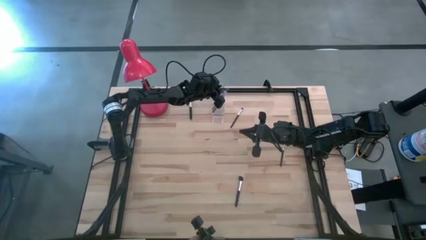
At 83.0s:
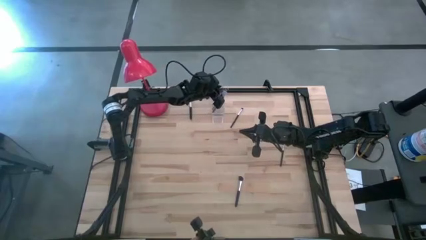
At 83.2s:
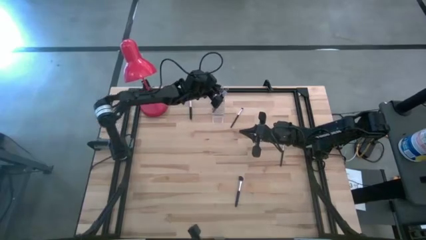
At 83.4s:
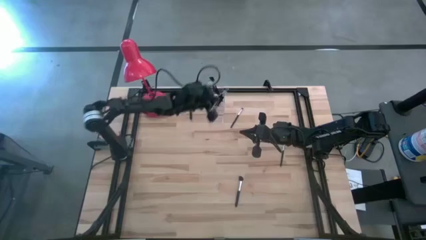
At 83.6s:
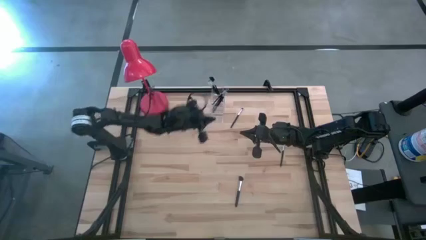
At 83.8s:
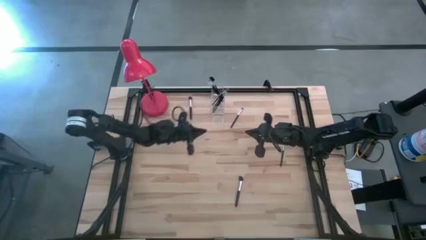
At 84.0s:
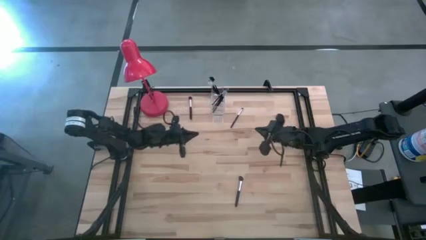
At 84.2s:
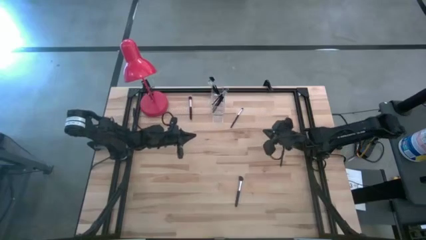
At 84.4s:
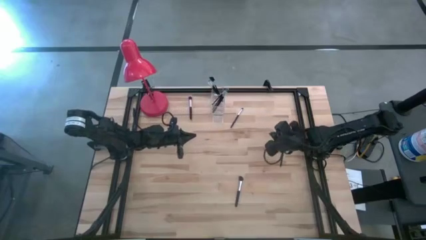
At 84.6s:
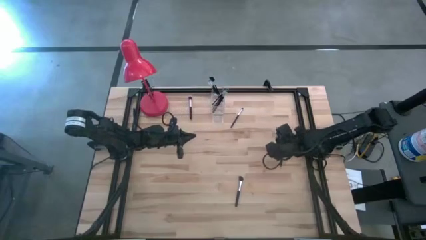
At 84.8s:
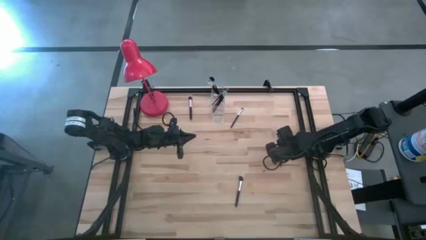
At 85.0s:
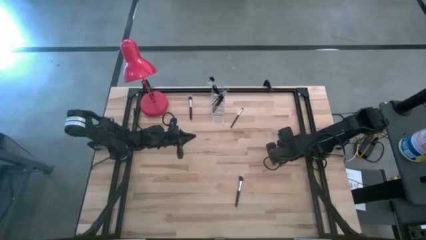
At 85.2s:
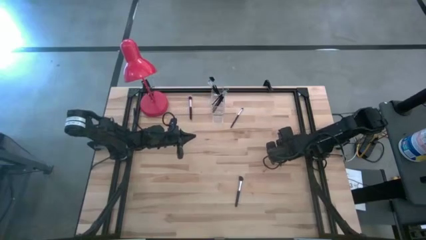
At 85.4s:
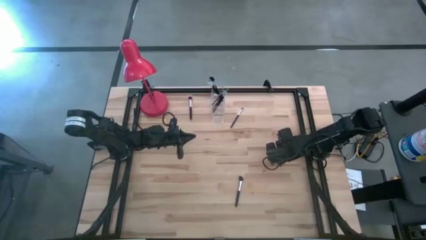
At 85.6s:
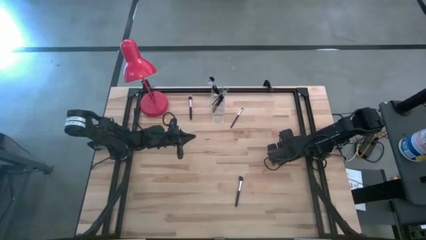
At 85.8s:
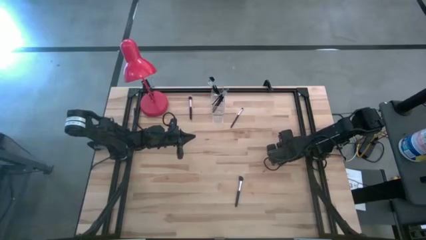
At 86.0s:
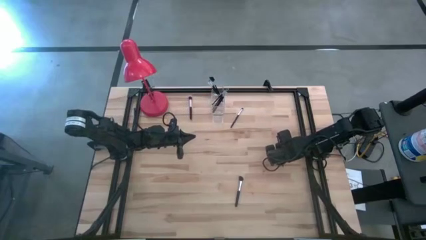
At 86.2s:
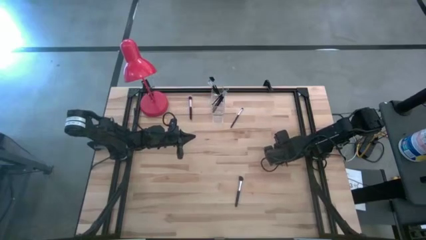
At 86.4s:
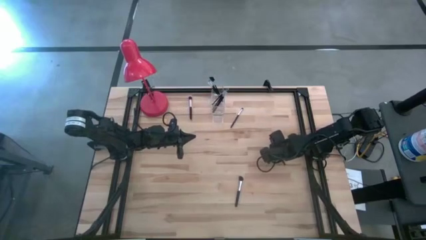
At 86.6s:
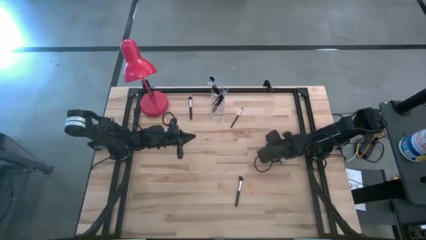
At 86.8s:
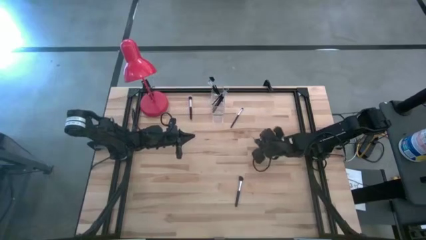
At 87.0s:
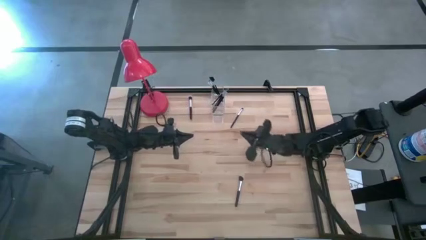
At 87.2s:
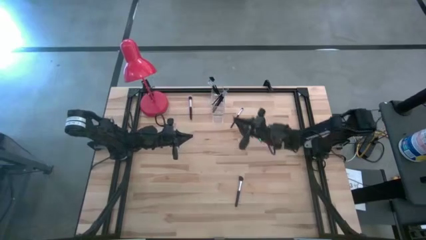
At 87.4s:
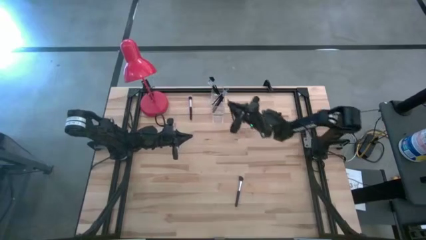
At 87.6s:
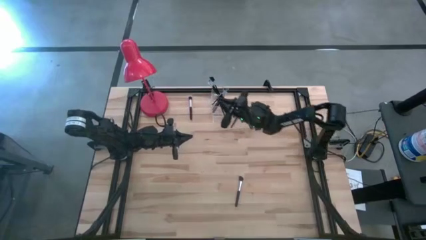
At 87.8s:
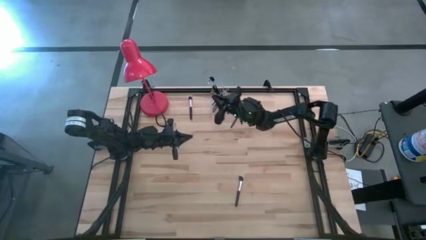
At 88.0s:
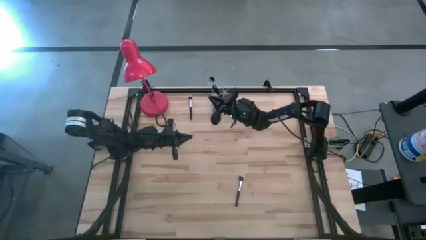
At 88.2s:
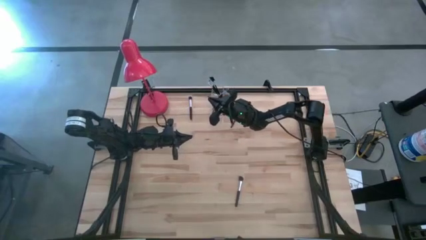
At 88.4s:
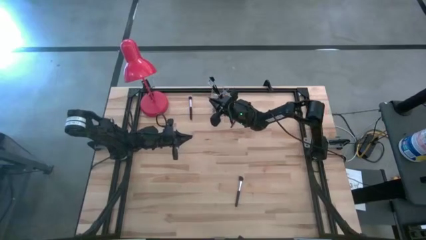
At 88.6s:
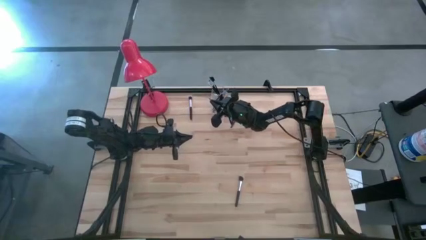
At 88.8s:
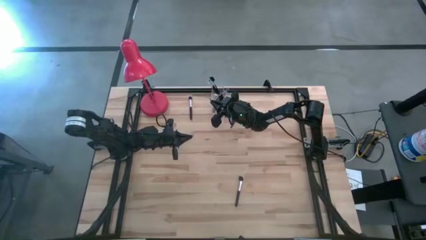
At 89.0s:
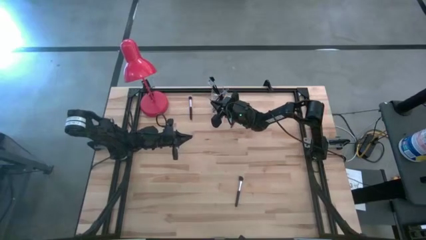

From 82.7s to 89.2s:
Task: Put items in baskets/containers
Put the black eyeshadow brush into the transparent organizer

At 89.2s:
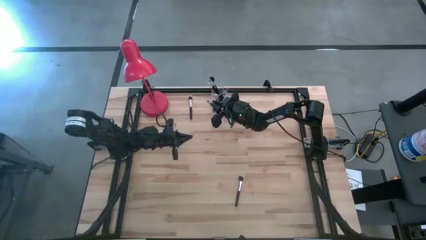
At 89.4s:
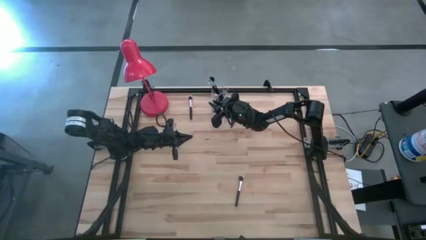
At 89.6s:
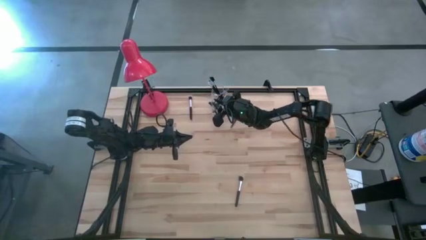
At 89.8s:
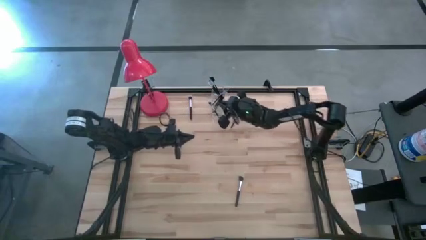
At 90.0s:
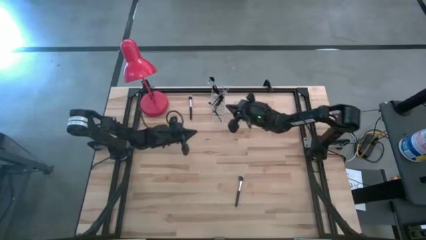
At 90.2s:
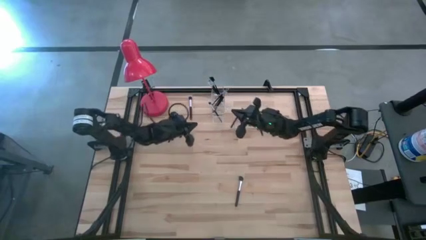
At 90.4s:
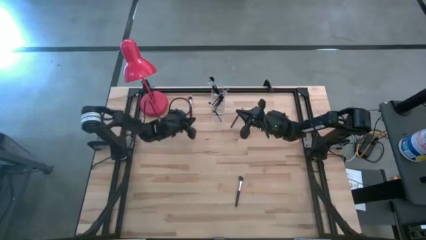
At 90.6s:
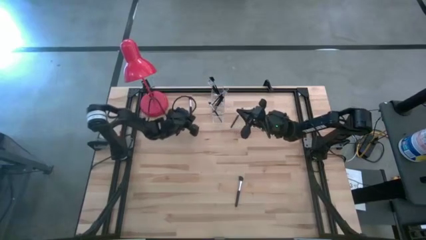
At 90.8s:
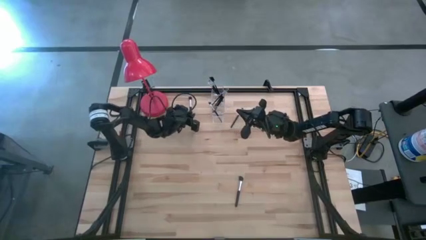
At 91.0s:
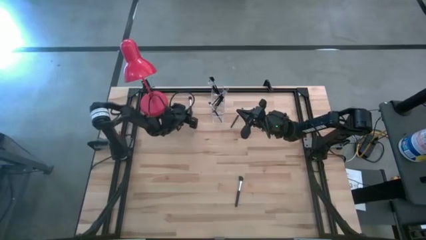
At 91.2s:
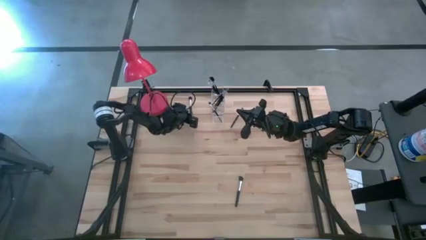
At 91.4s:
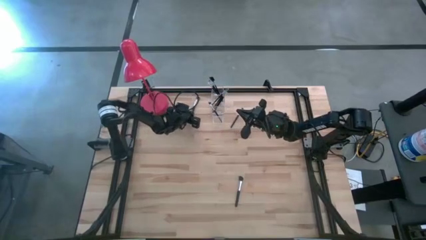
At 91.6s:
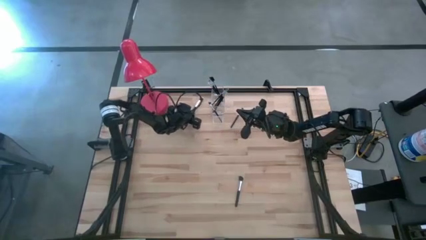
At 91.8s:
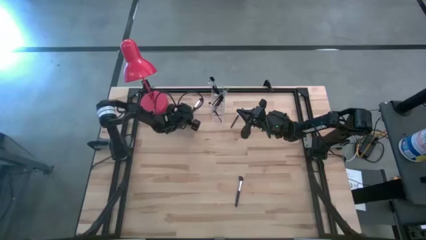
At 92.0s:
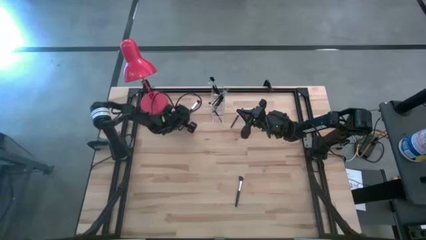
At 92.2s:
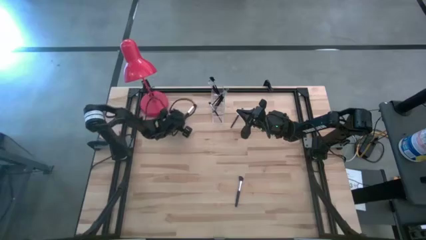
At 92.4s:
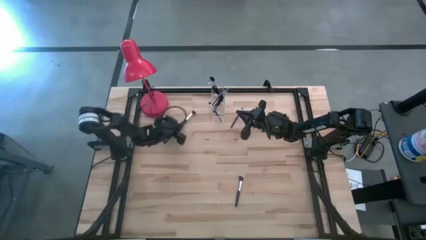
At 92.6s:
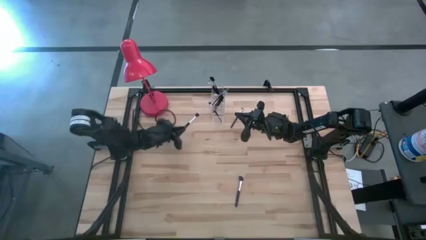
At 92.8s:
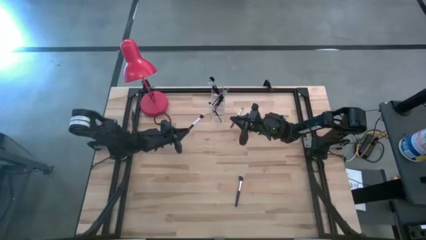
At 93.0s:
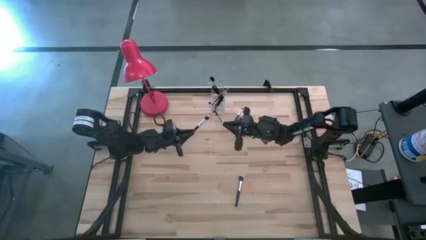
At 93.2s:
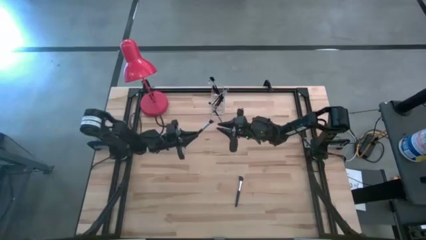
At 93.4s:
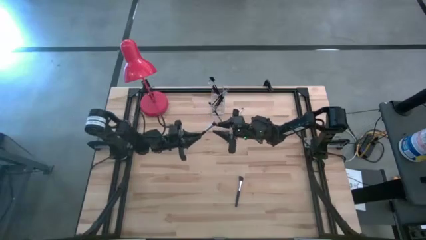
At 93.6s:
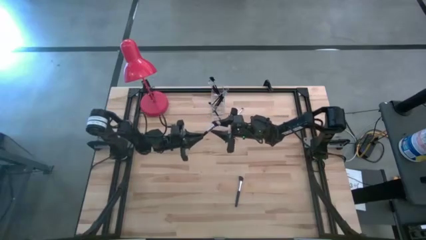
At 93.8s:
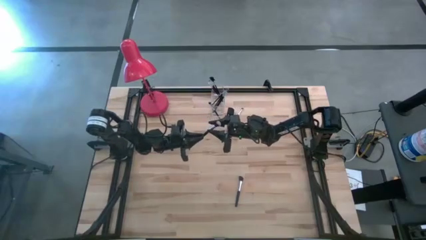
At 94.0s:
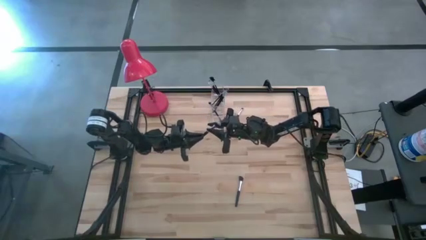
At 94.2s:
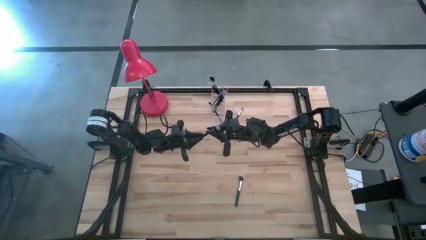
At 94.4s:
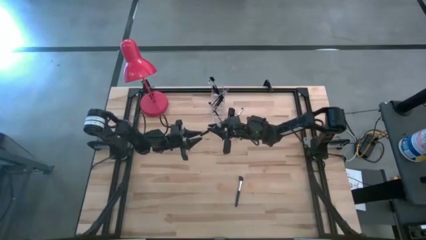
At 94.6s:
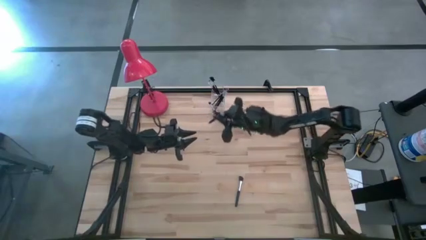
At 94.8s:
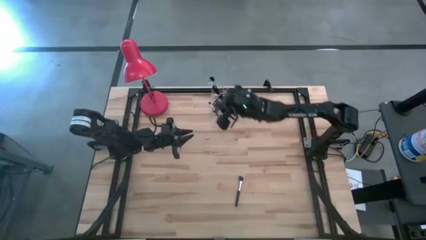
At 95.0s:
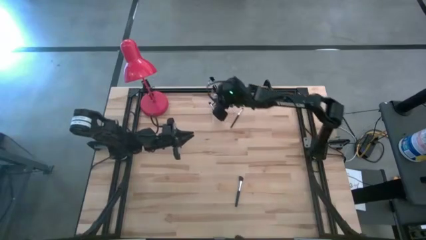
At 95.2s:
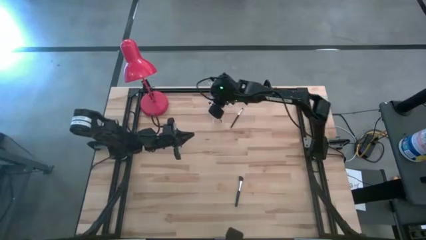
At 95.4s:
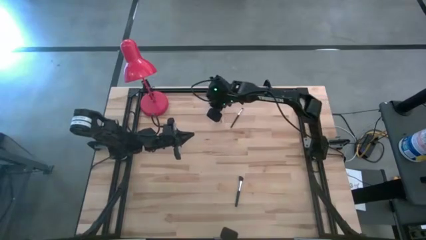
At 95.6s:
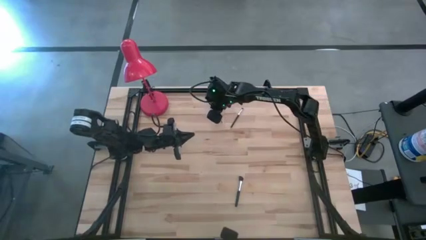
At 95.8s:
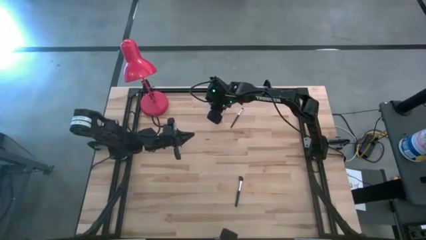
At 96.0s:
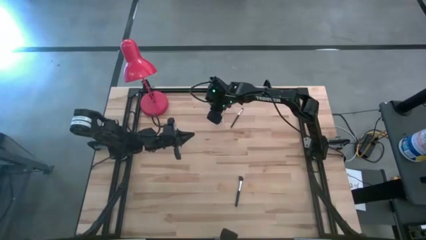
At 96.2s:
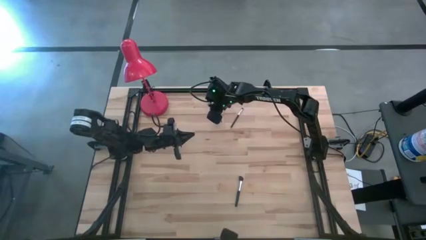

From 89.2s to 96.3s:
Put the black blush brush into the transparent organizer

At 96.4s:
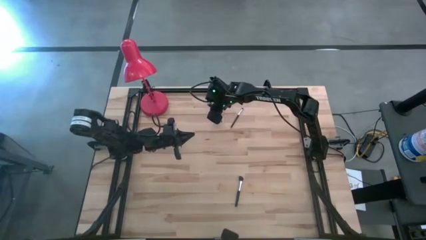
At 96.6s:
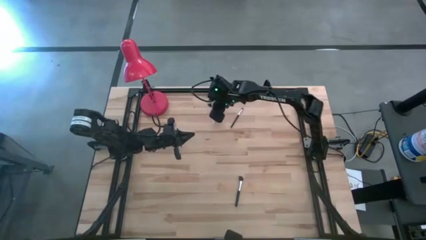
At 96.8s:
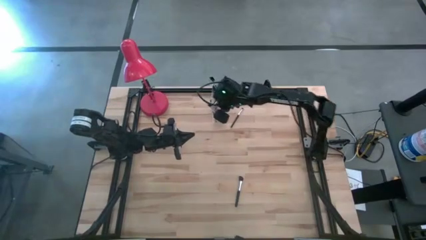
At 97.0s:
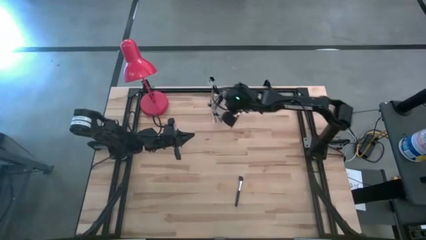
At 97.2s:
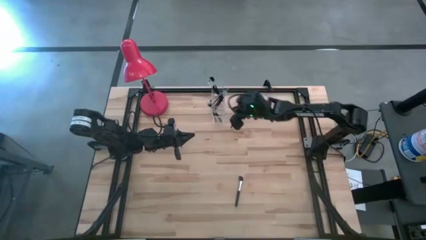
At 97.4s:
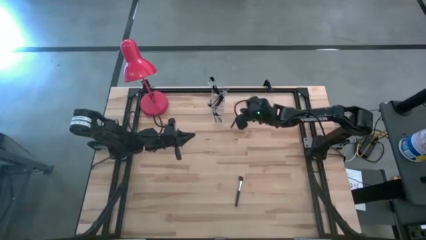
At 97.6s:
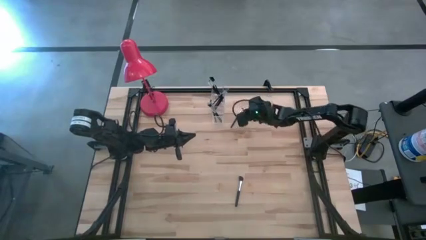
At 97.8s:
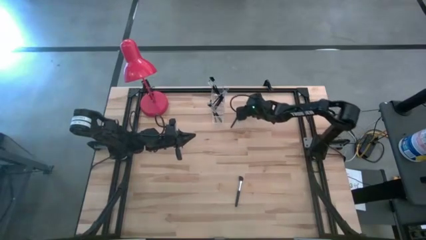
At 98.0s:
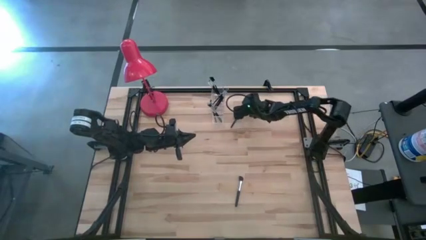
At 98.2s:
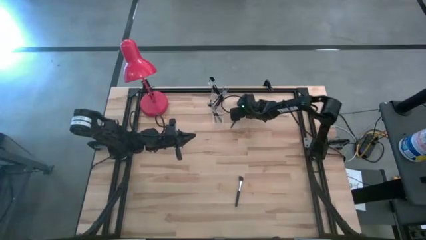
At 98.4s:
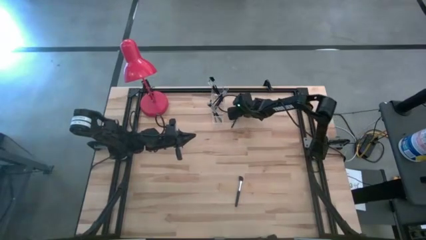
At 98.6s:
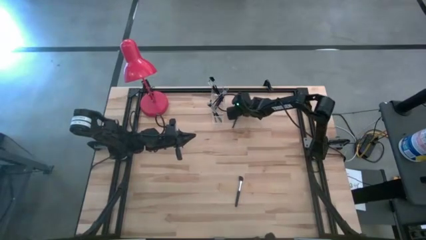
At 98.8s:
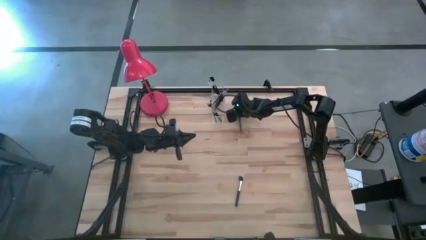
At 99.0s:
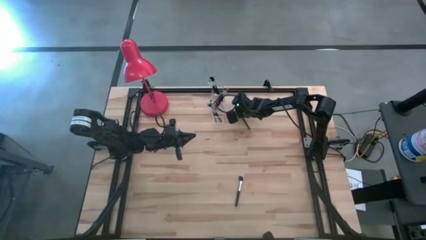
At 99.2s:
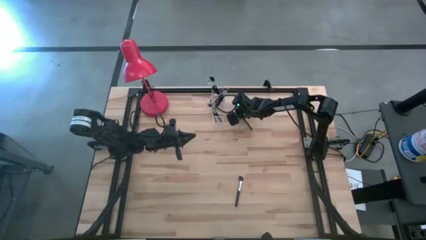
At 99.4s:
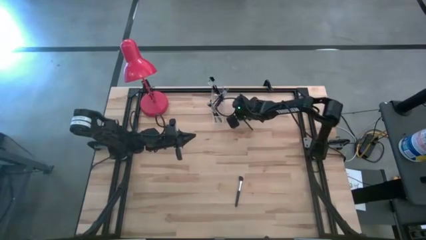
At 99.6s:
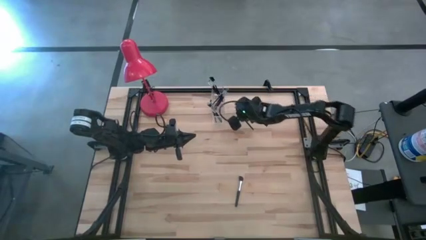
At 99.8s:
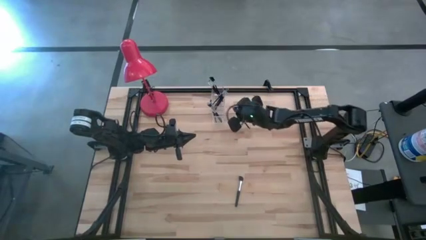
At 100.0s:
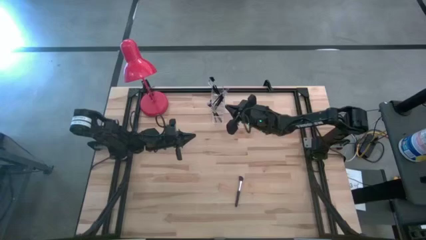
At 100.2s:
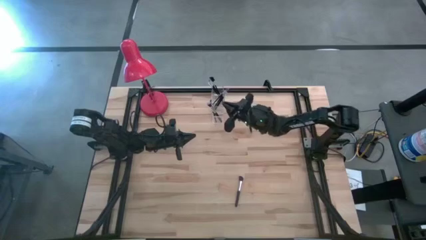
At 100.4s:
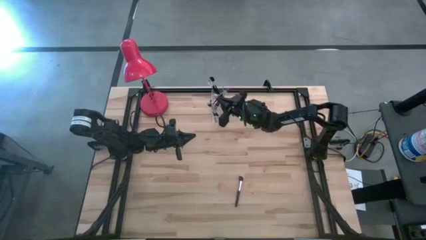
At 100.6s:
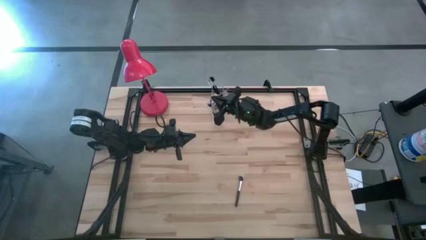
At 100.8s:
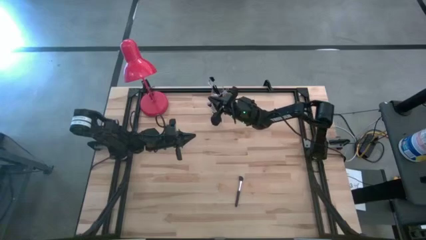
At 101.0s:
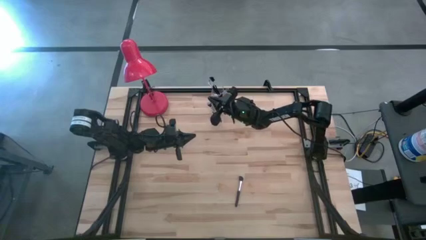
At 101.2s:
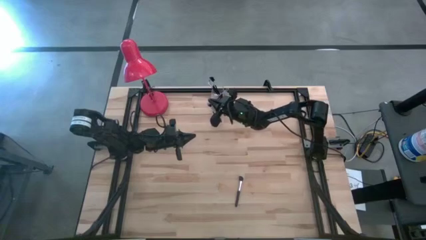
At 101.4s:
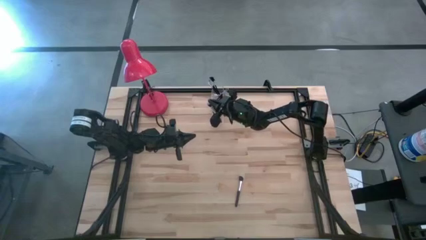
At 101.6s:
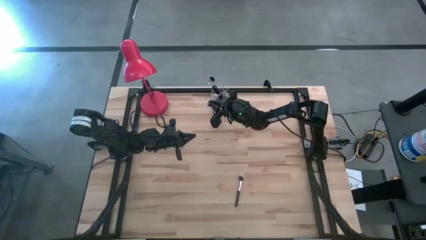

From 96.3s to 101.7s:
Put the black eyeshadow brush into the transparent organizer
